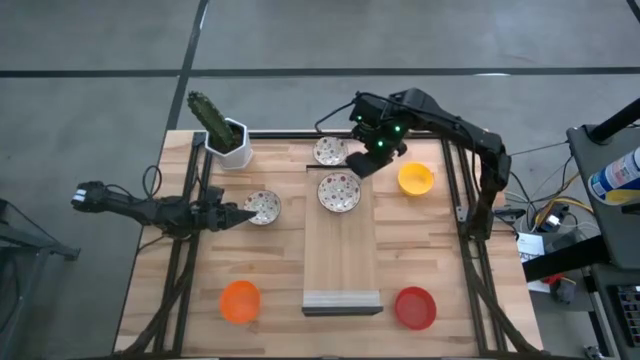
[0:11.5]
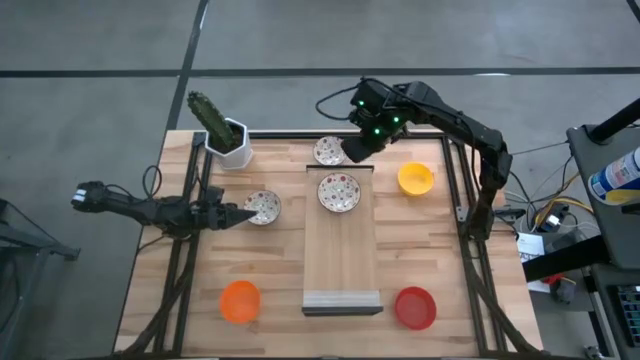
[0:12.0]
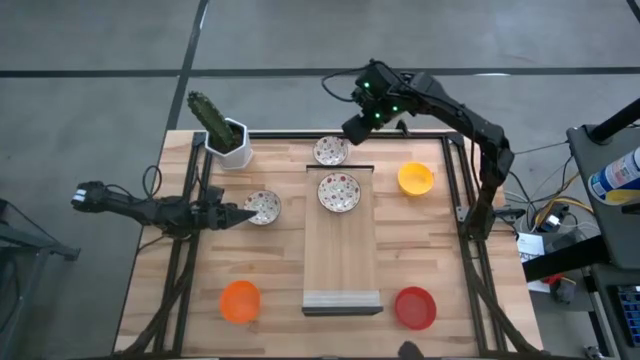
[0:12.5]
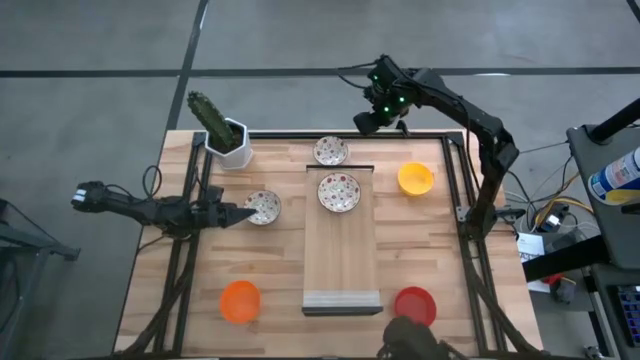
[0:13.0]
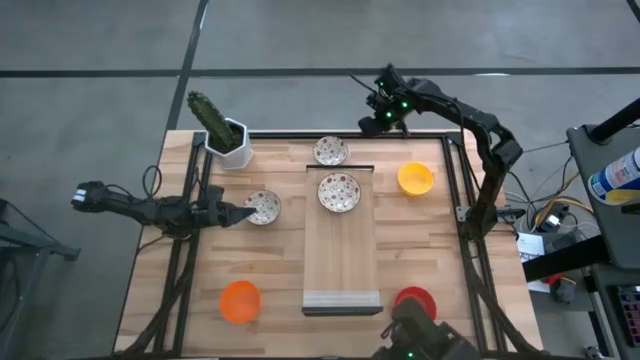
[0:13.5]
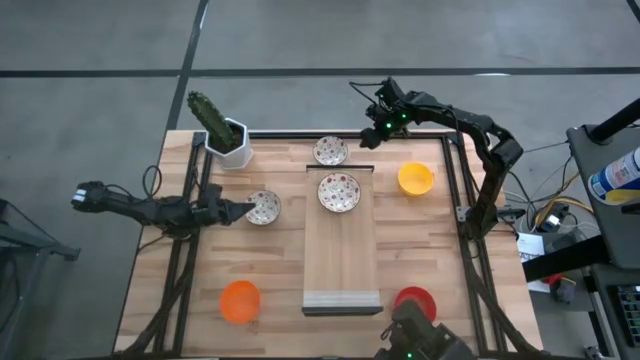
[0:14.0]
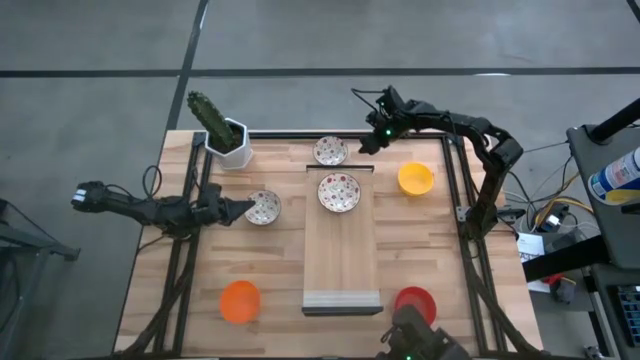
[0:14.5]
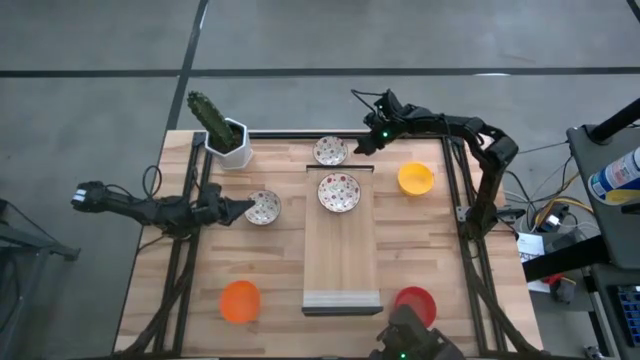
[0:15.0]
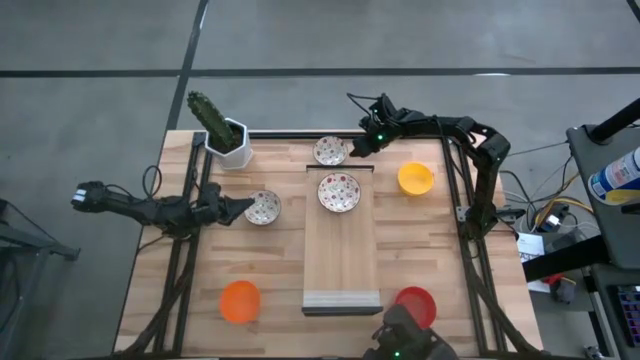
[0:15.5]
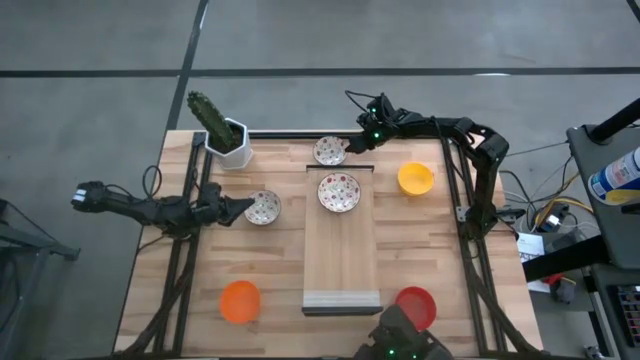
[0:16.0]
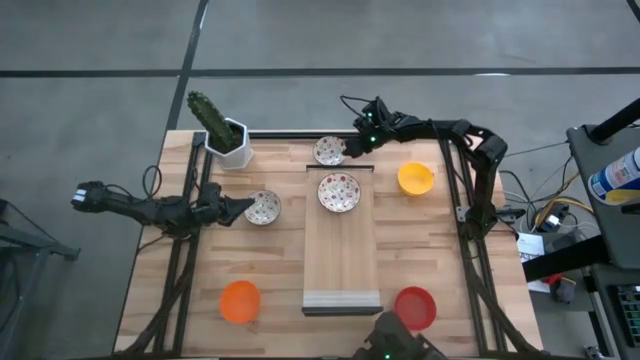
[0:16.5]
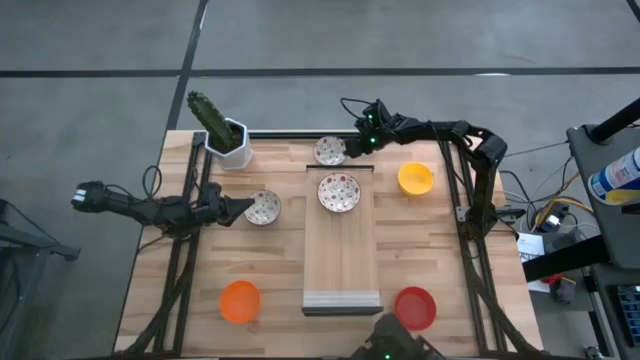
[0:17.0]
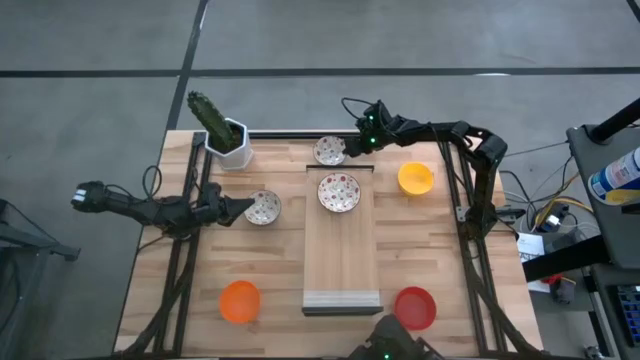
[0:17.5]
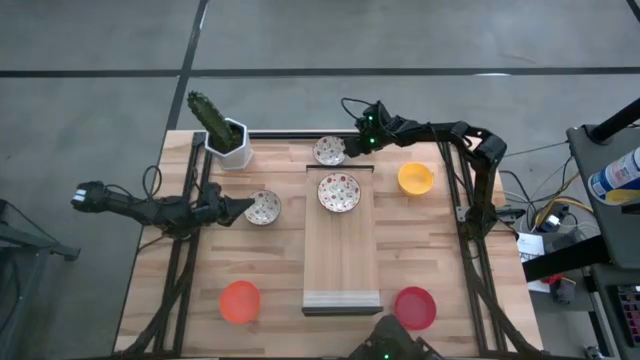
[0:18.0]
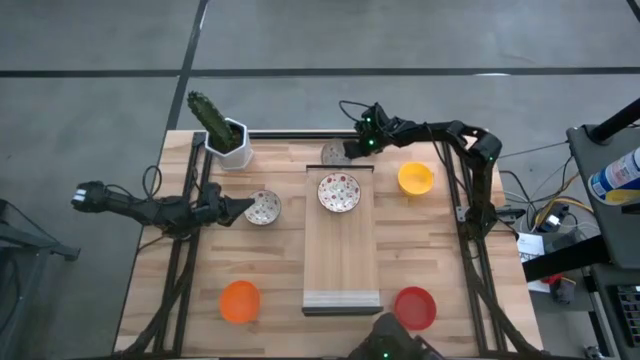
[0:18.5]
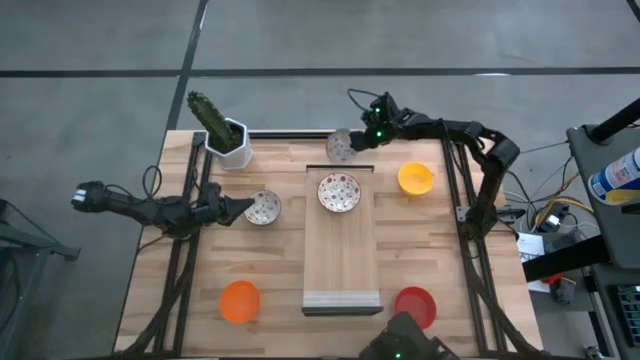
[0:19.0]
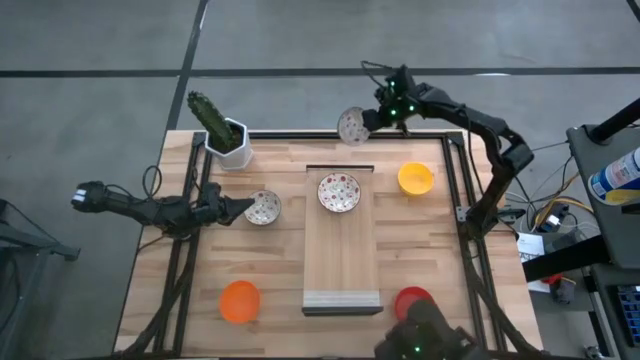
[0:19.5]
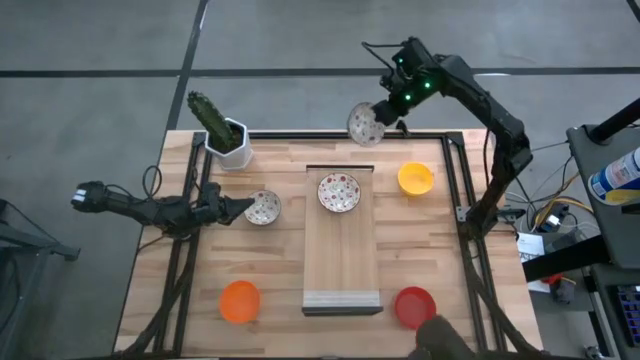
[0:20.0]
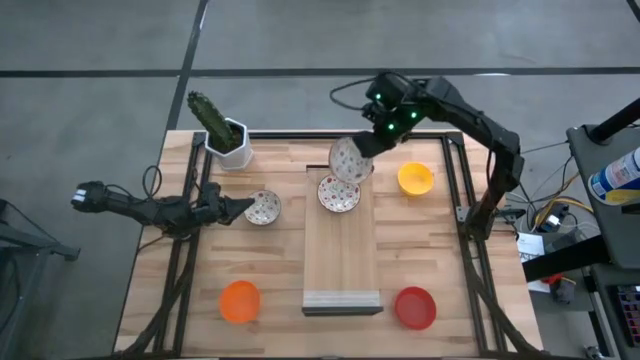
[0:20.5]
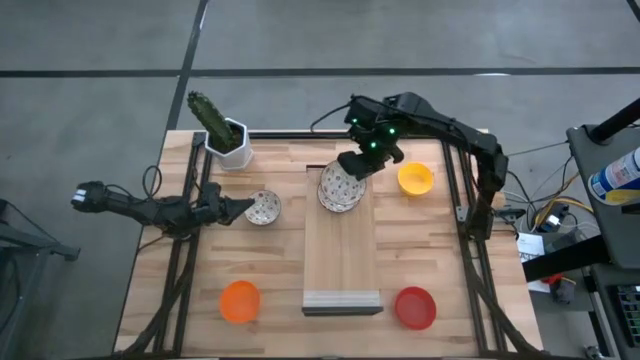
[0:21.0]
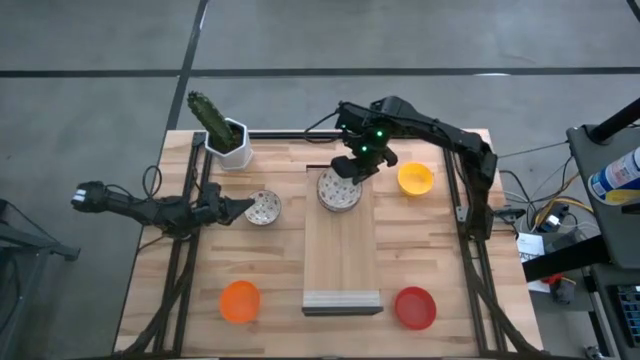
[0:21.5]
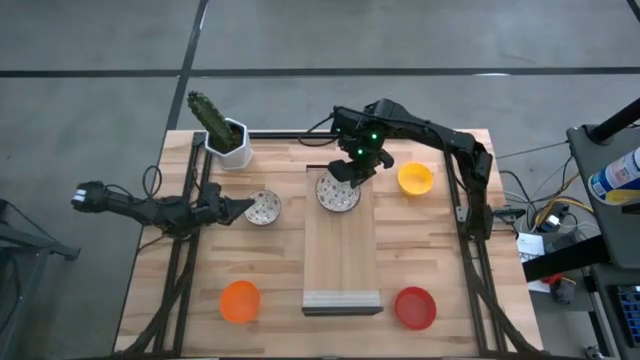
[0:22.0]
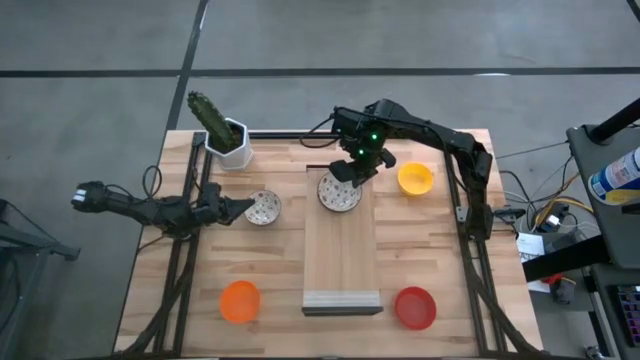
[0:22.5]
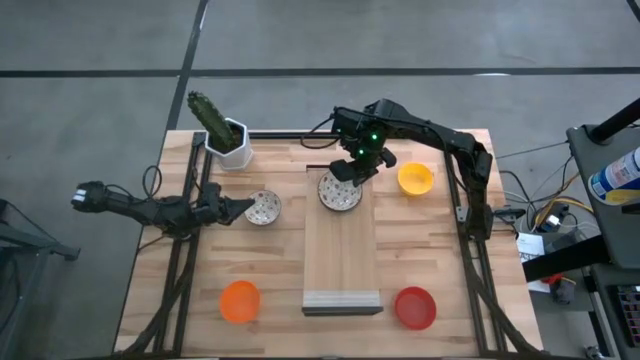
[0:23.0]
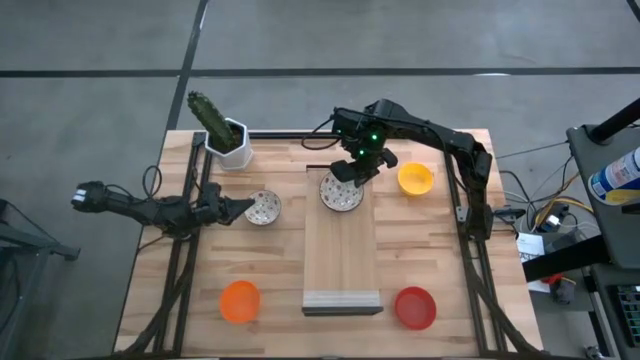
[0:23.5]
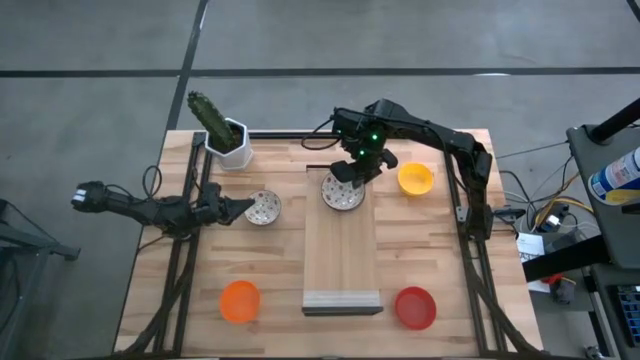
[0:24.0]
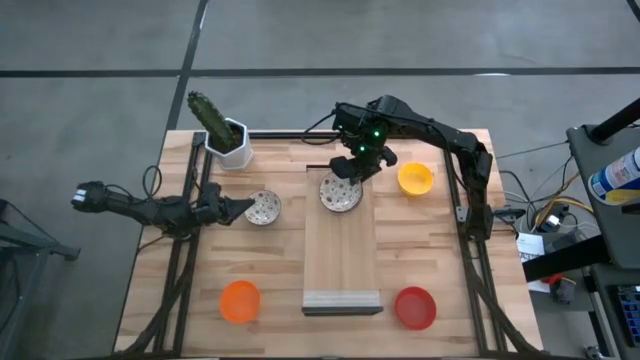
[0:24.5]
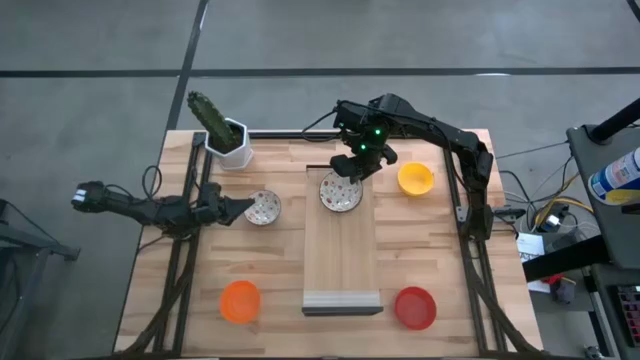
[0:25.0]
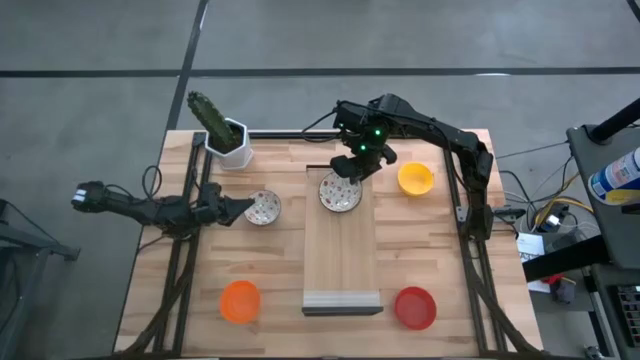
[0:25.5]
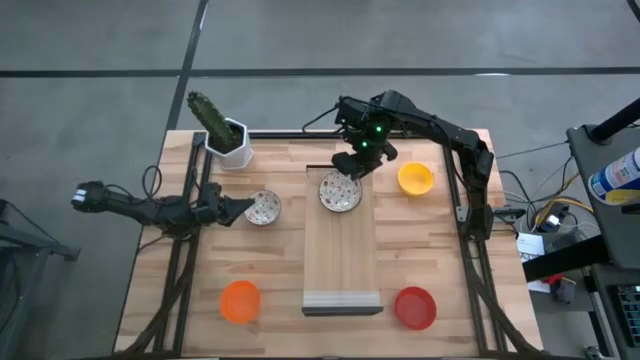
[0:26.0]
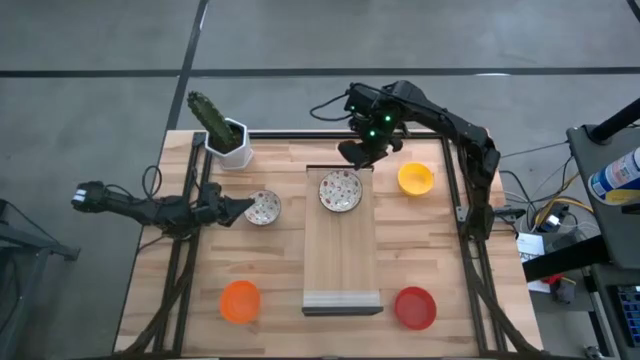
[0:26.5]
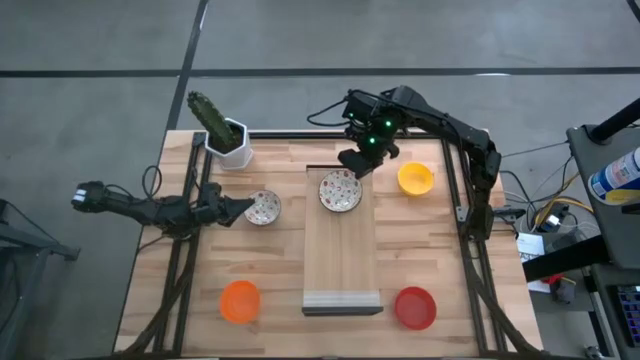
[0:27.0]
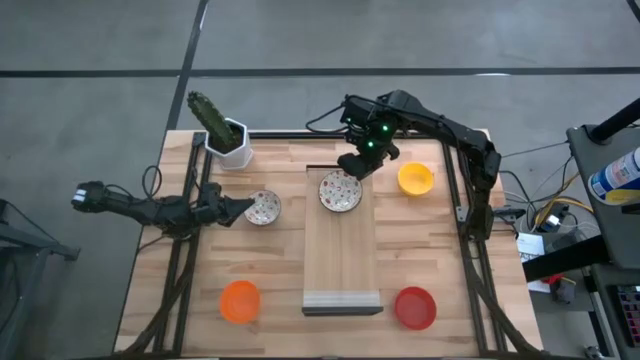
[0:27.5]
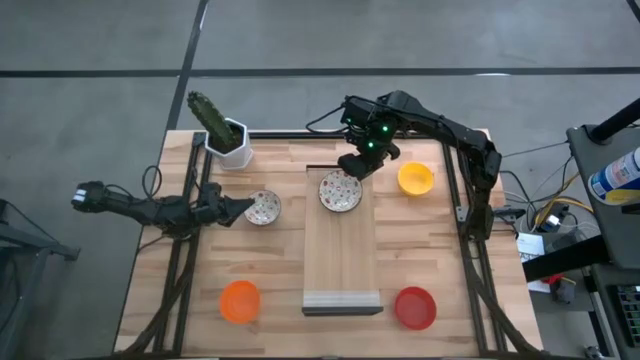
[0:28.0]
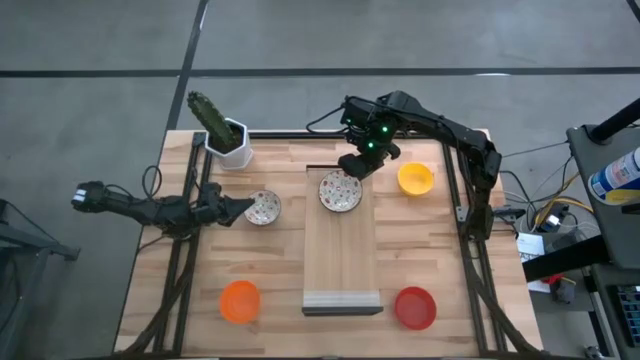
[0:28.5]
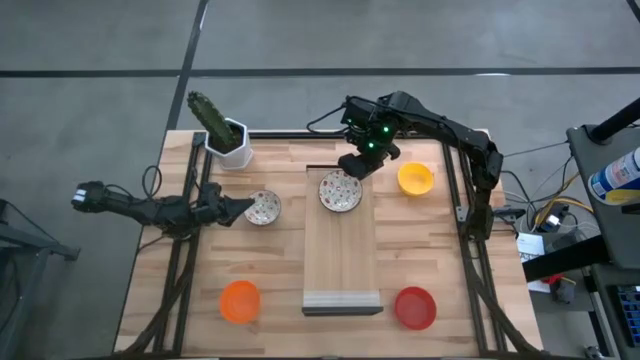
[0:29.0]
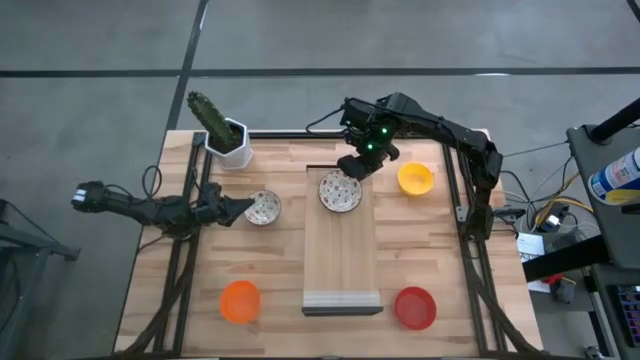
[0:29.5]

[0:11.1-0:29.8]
Task: Pick & Place Mini bowls
Stack the top white bowl on top of the white bowl on the shelf
